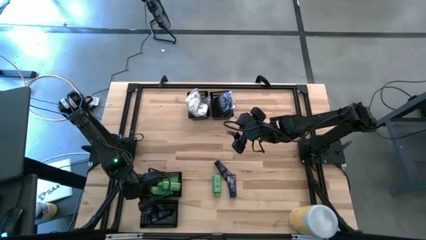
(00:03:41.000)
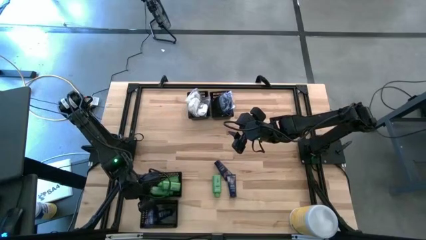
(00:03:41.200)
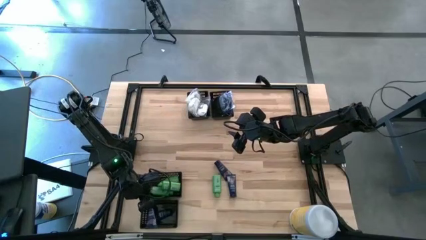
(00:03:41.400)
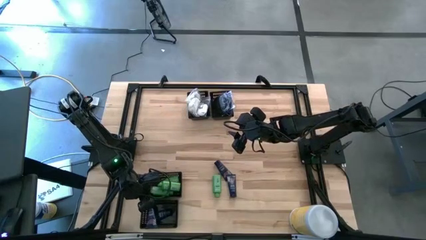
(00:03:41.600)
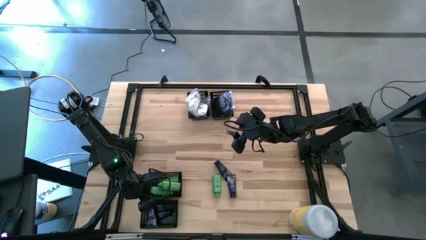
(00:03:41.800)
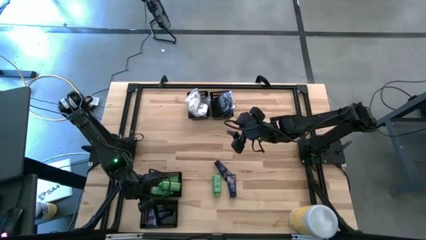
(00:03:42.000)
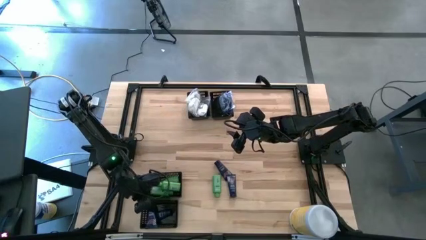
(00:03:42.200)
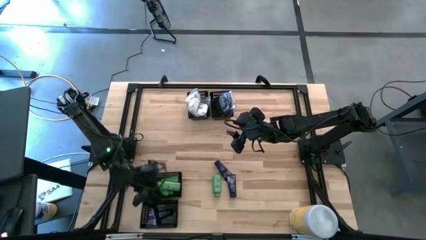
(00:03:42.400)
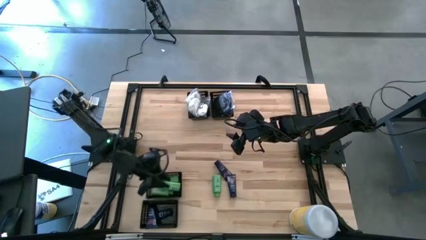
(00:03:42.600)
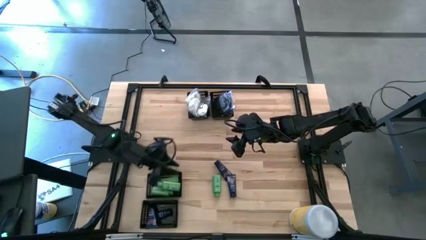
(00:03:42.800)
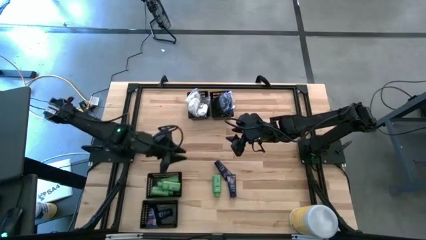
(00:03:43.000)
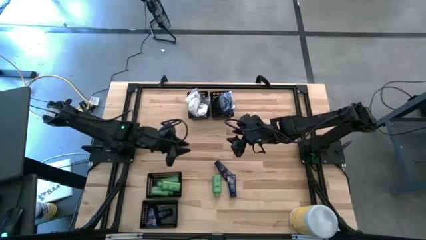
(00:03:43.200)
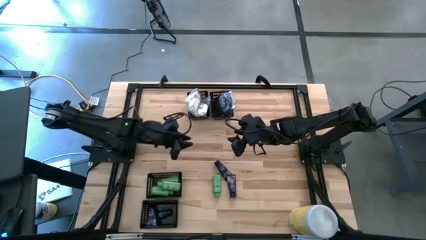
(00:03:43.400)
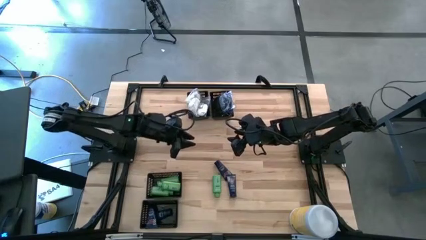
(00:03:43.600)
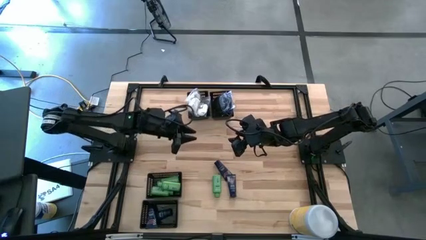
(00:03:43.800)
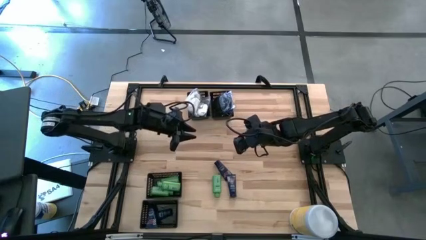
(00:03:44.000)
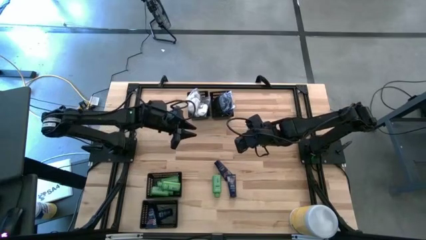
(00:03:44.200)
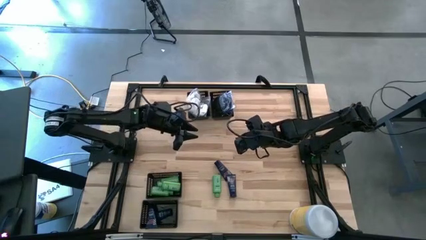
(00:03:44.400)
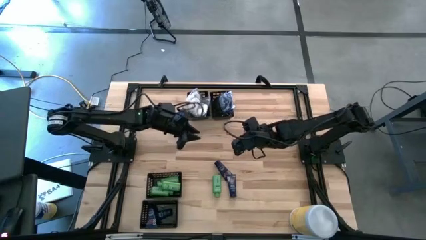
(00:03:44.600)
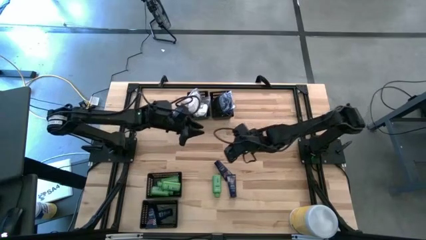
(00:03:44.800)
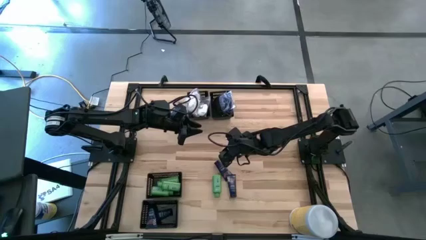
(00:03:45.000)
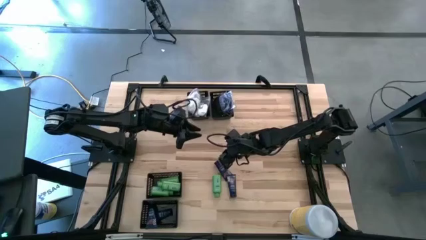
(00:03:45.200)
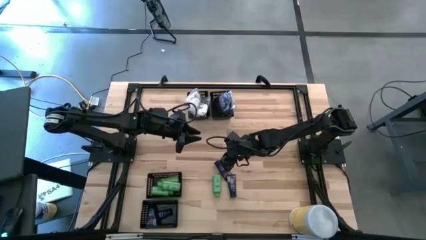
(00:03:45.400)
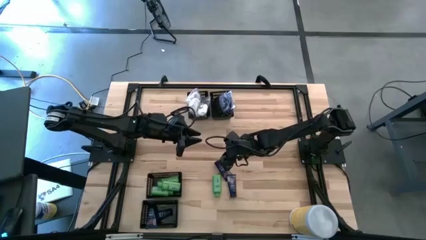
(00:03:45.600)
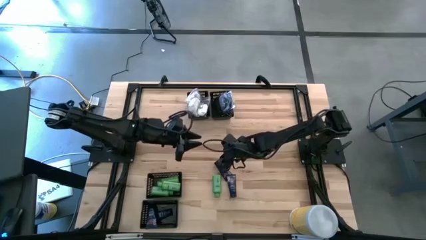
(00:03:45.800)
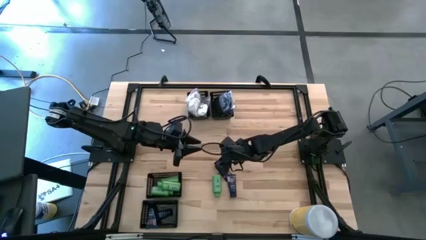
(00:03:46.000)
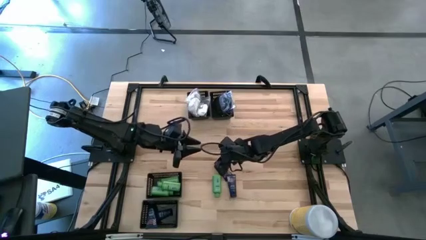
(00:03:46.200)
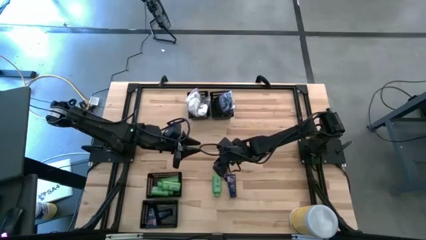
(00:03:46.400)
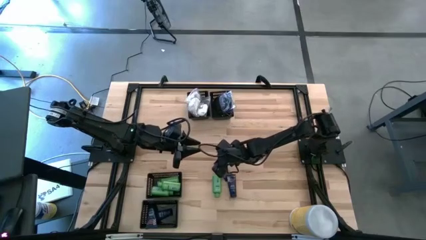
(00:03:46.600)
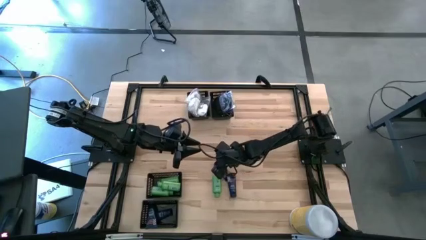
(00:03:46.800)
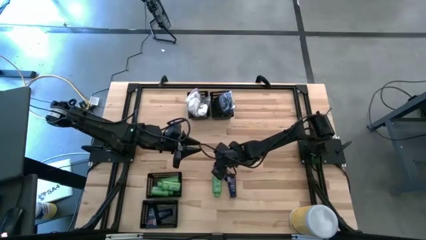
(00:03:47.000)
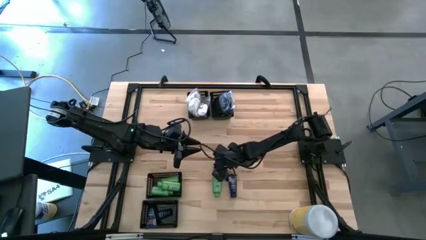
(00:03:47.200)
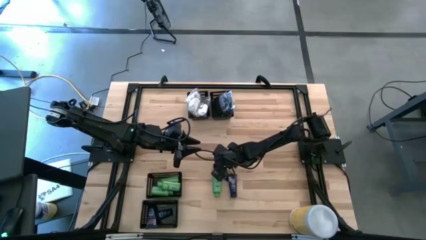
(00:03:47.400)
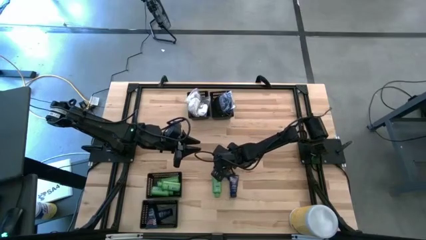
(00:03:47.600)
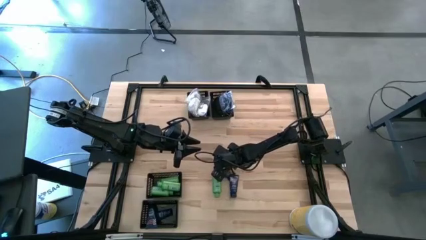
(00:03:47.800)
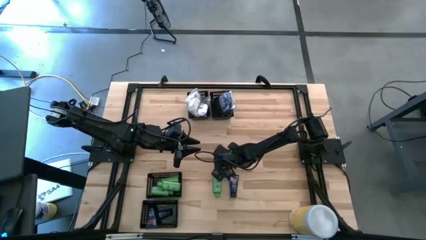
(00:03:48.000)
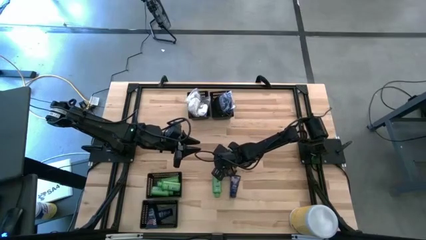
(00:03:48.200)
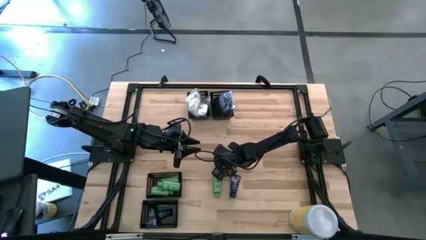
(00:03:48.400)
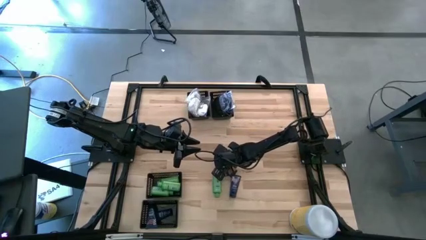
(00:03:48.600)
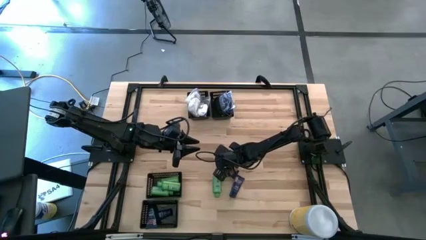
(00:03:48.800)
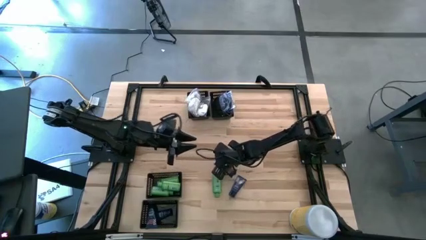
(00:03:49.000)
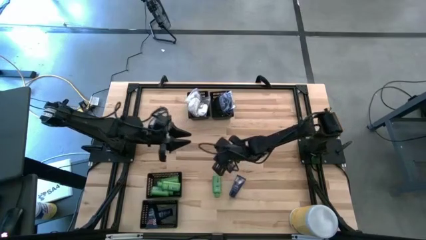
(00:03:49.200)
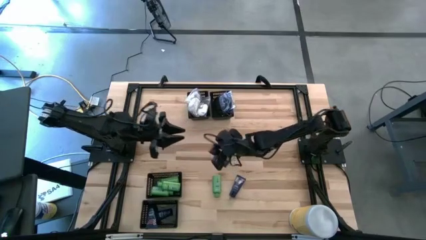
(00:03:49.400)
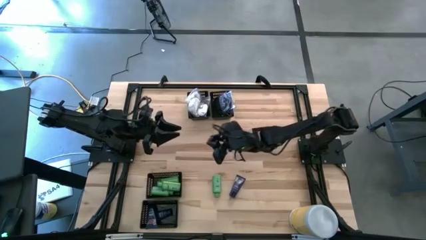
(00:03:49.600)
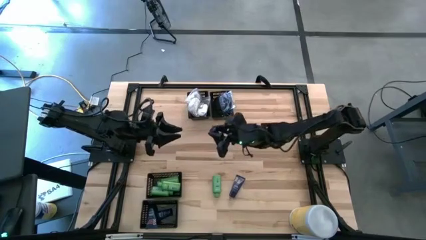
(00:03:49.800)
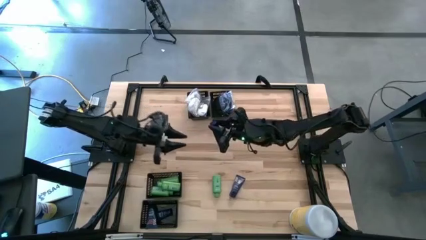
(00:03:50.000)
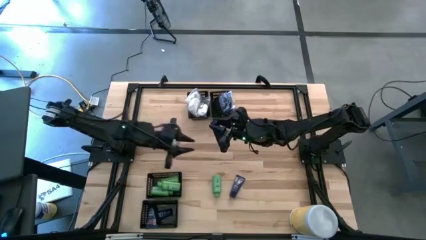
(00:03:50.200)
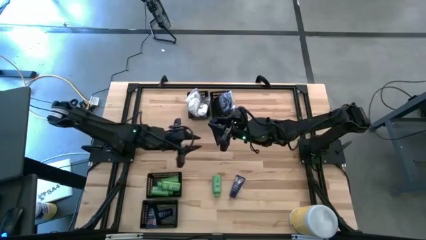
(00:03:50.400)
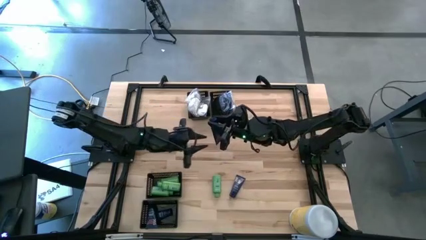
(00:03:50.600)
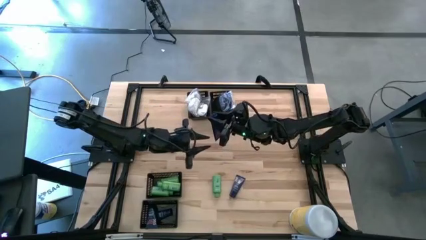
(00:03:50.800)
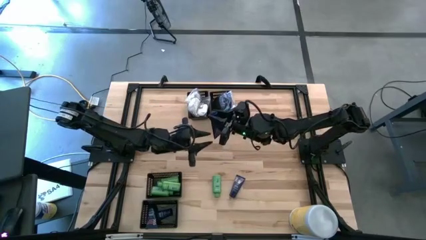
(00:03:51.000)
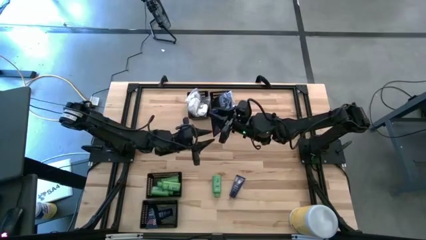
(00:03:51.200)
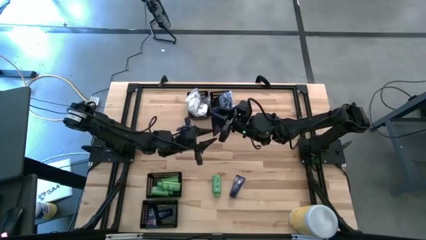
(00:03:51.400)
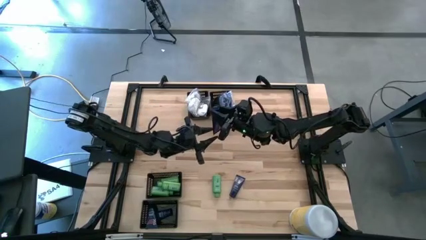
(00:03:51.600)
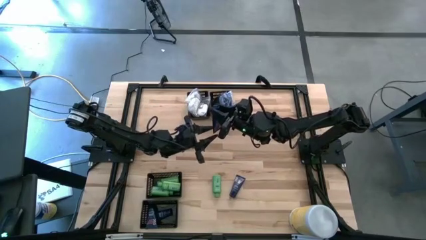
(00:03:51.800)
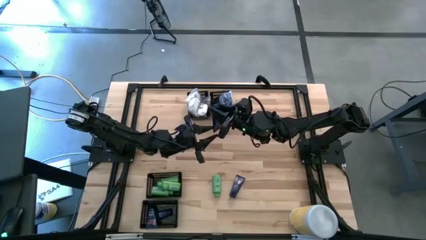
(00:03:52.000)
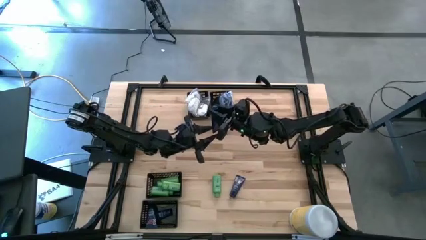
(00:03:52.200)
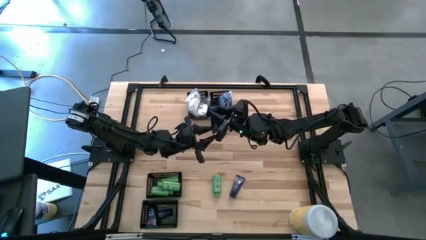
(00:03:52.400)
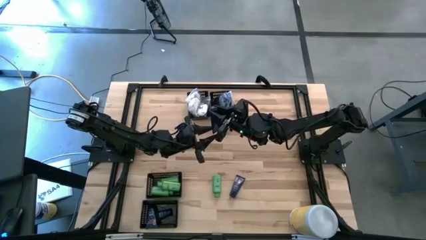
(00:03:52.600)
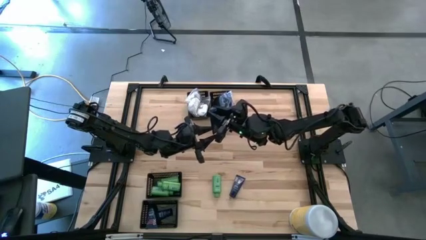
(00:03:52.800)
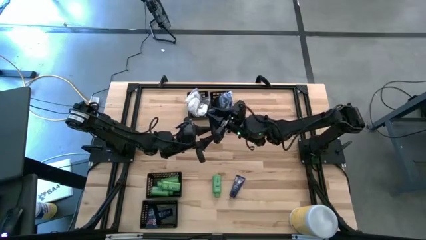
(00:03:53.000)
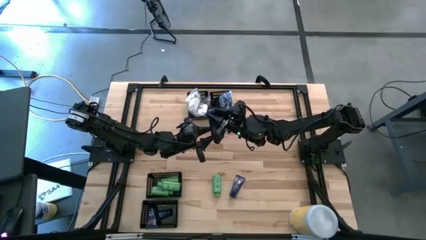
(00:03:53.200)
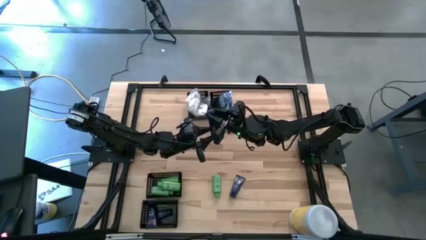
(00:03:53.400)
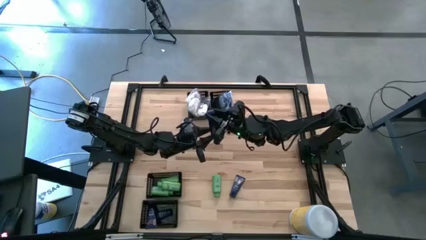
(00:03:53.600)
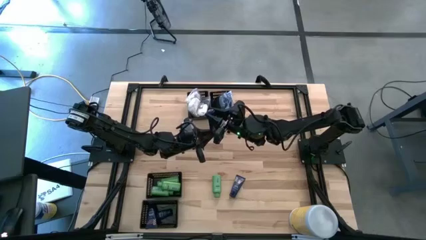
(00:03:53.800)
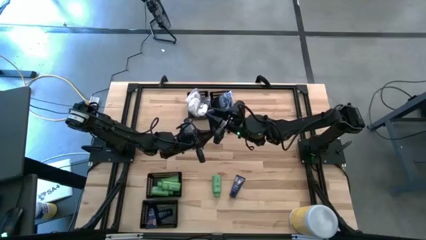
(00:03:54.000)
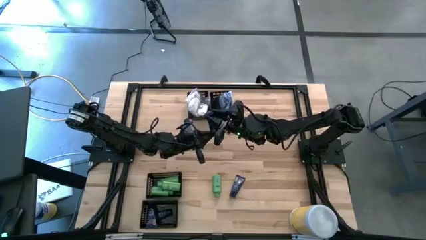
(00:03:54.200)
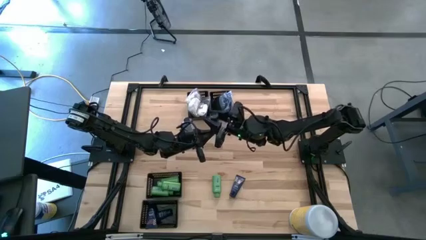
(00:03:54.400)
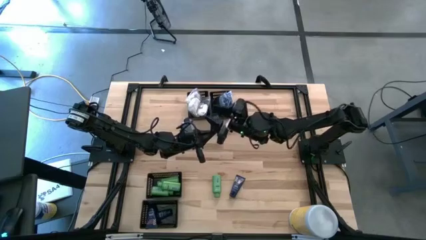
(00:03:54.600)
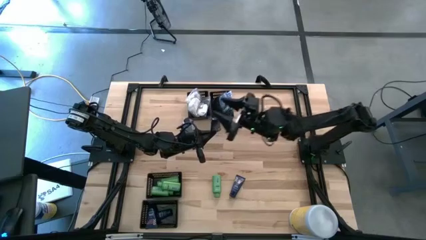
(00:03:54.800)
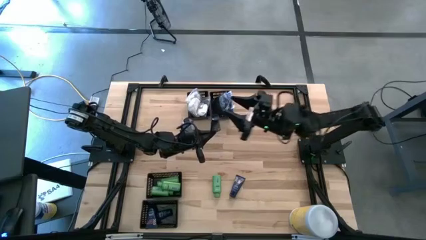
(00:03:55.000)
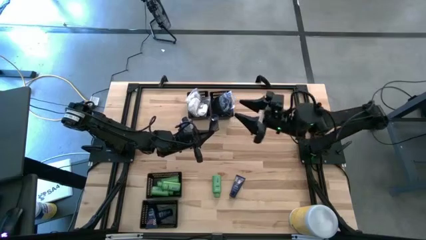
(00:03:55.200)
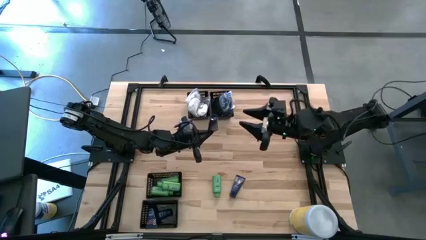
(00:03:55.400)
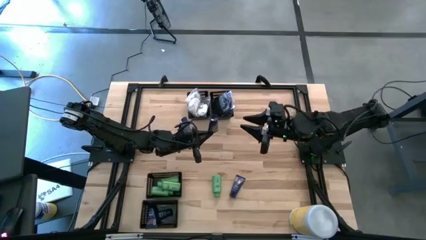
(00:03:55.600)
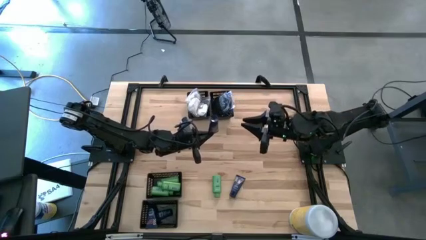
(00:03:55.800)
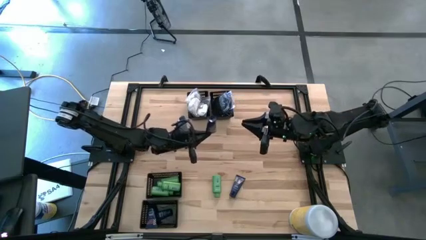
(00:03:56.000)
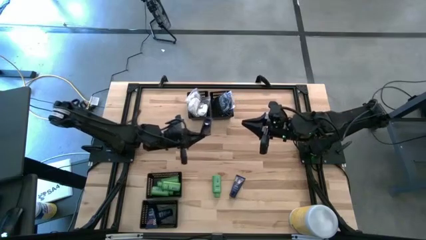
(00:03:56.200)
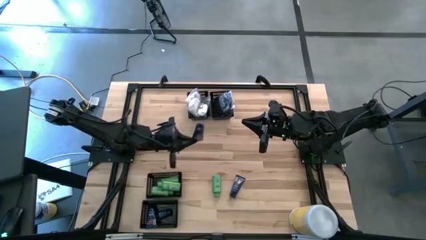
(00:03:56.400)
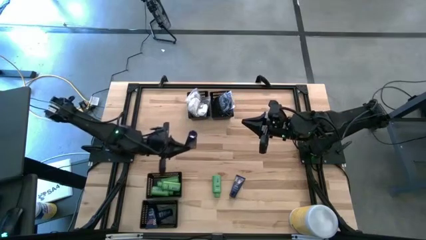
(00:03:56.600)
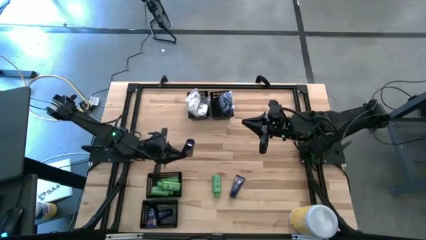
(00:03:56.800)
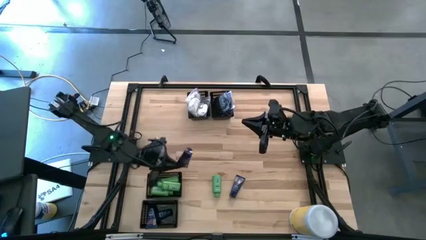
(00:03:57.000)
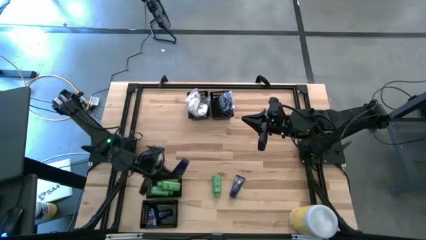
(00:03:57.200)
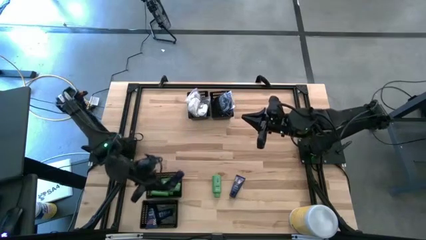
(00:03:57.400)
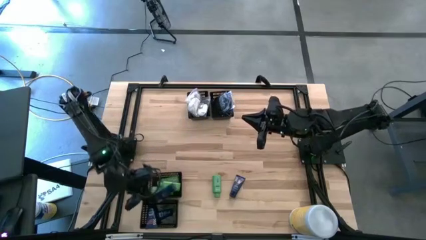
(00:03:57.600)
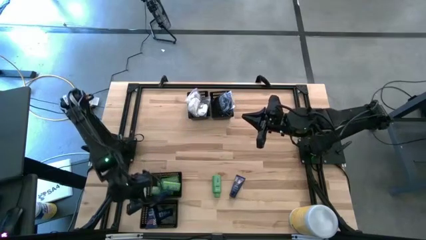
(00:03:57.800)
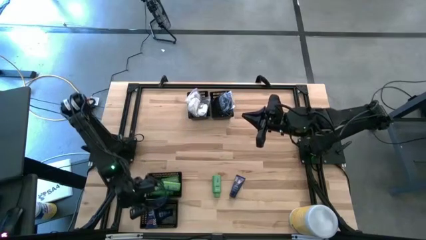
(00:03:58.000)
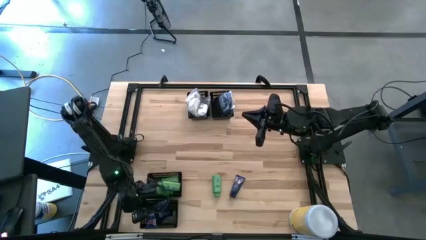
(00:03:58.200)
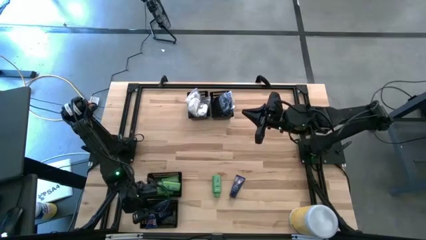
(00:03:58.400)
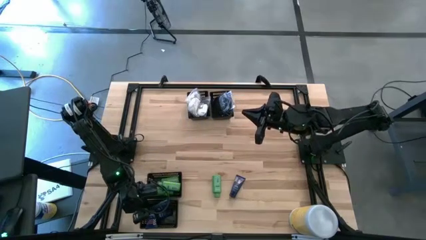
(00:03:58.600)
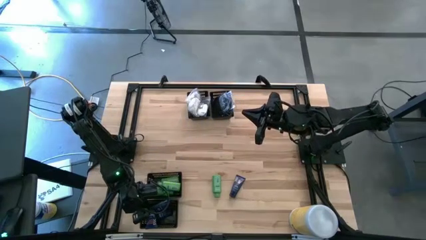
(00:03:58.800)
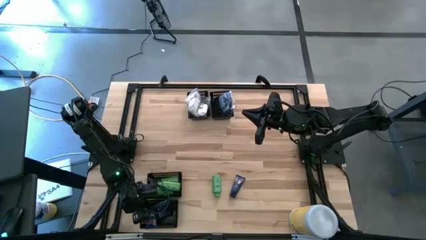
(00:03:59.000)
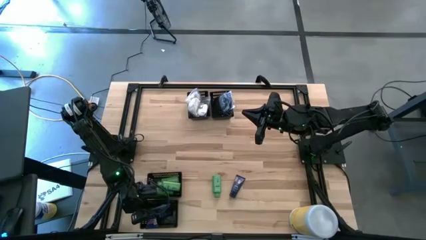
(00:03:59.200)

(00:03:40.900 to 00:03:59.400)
Task: Pick & Place Travel size toiletries
Put the dark blue shave cream into the bottom left basket
